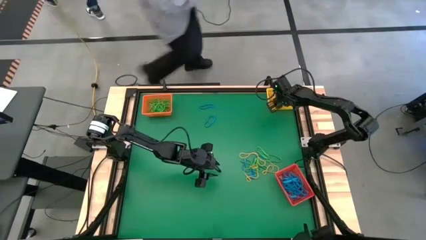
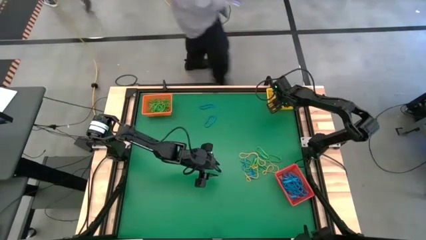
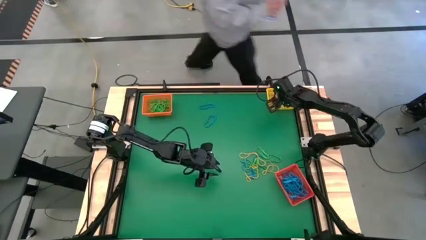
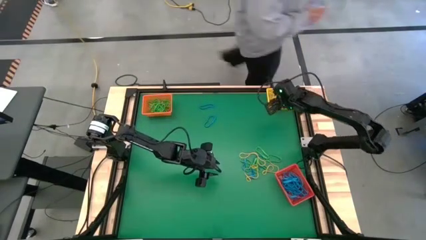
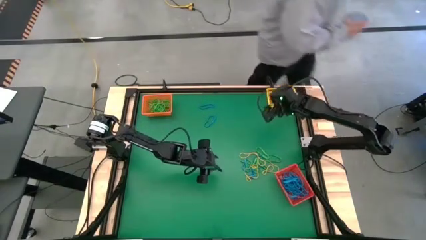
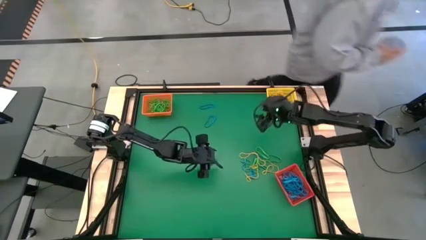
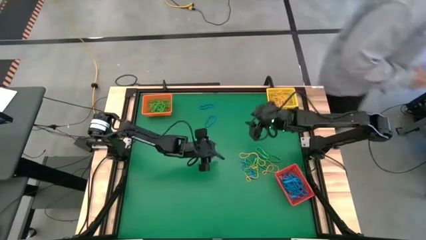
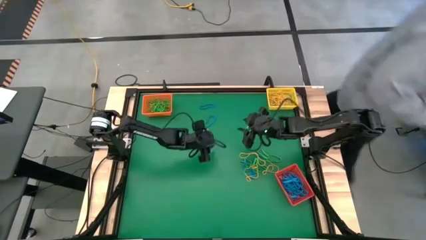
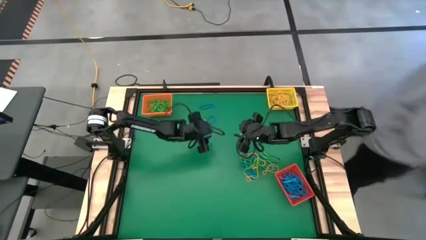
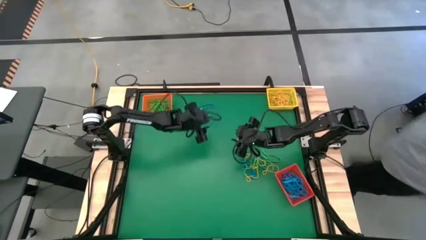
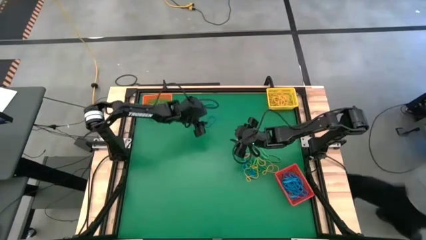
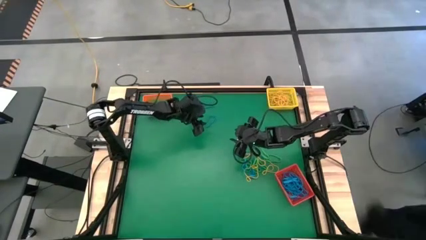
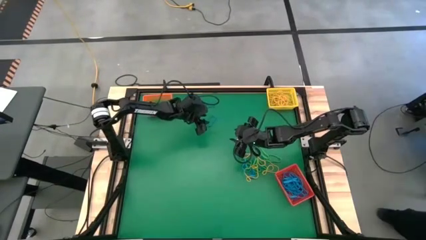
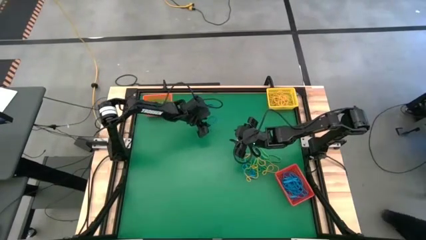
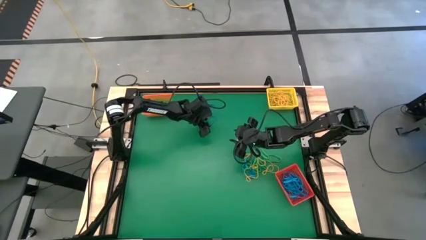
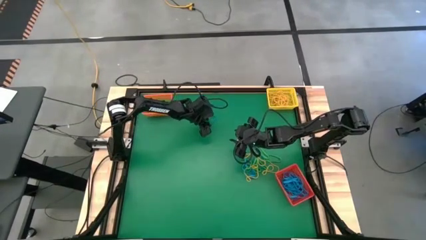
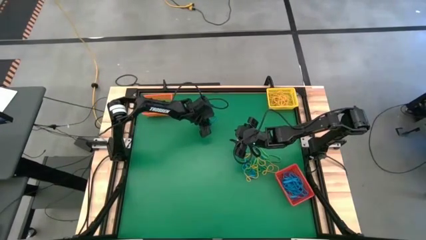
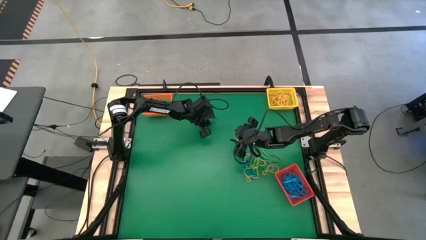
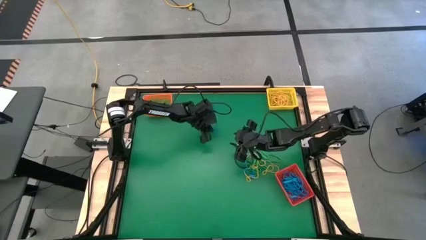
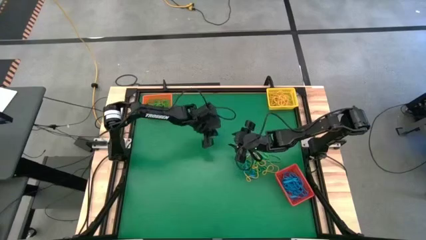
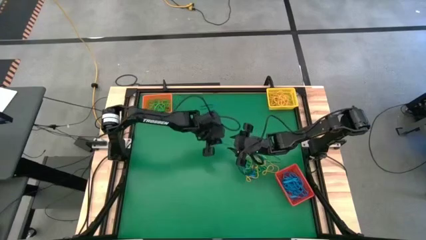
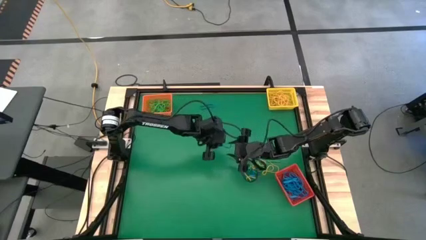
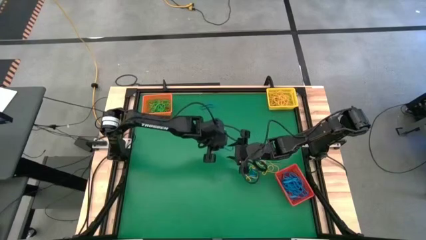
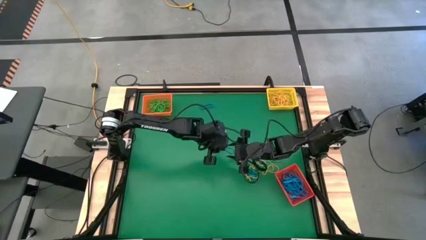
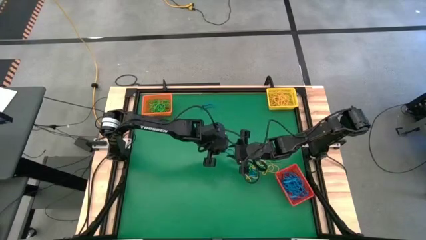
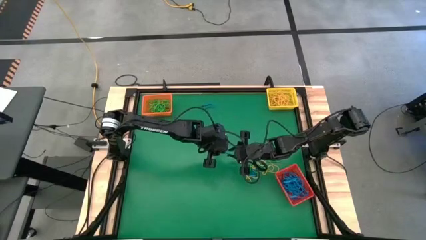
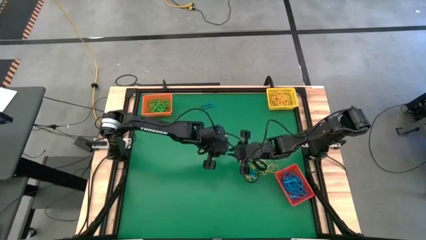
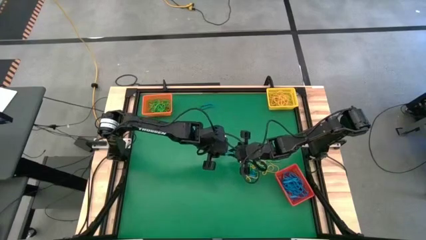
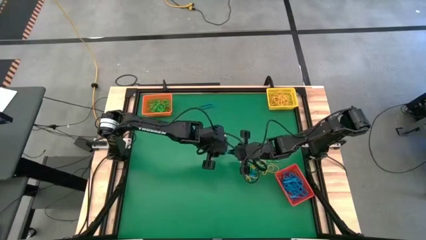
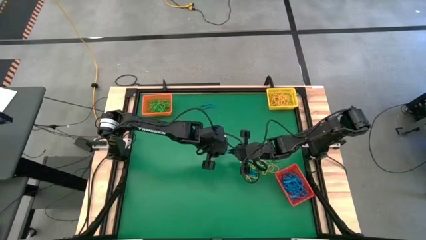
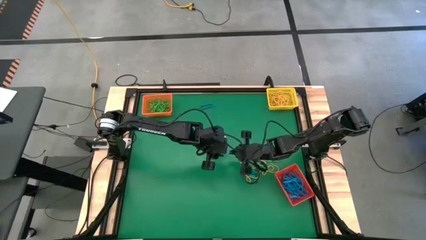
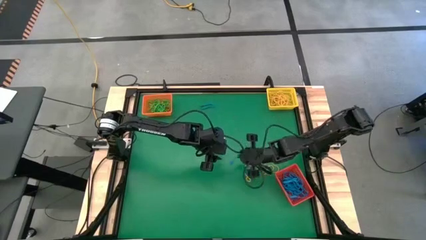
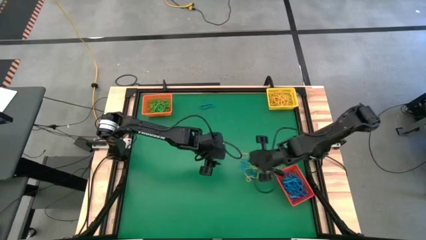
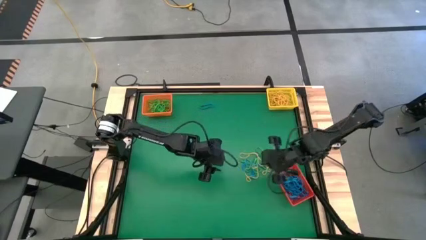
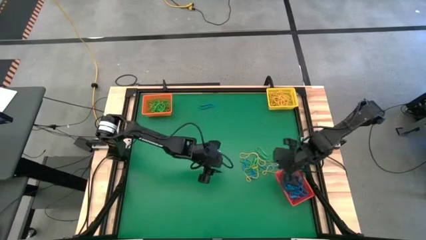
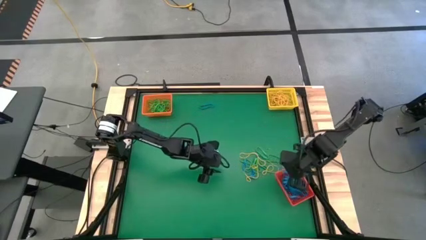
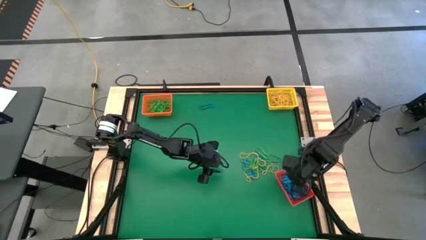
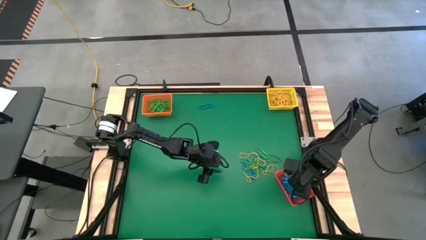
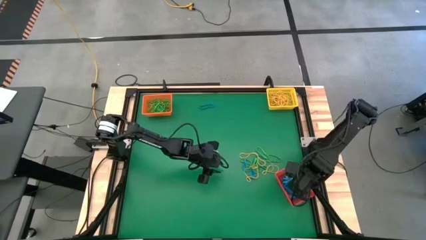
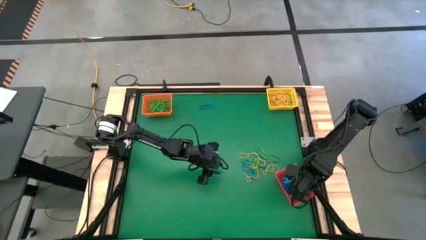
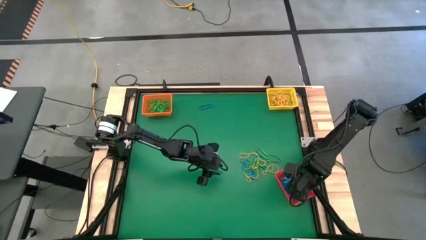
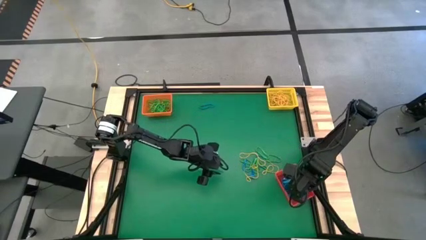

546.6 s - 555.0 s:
Task: Sort rubber bands into baskets
Put the blue rubber band into the red bin

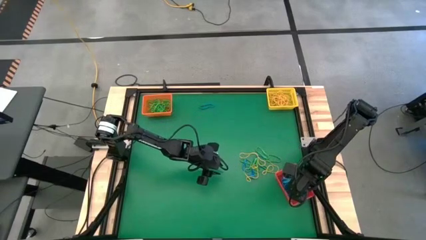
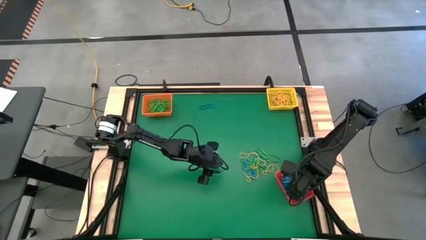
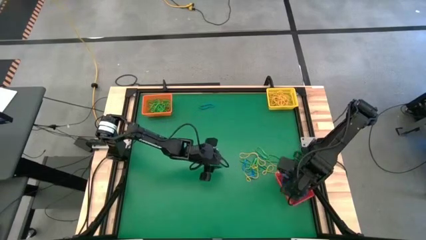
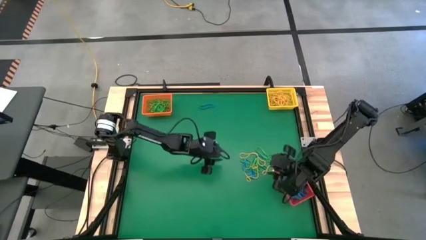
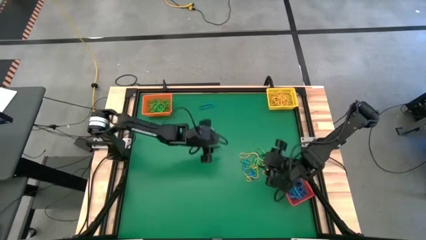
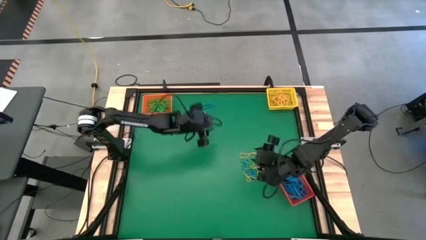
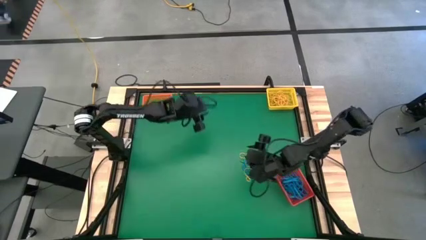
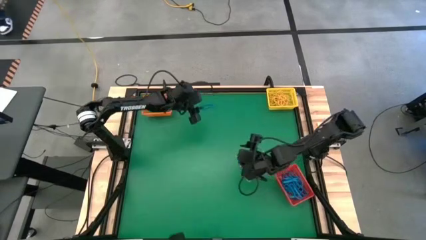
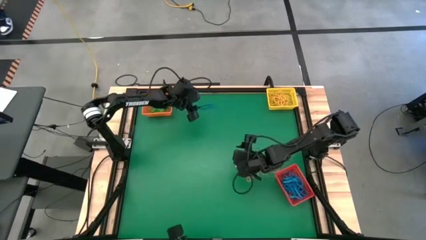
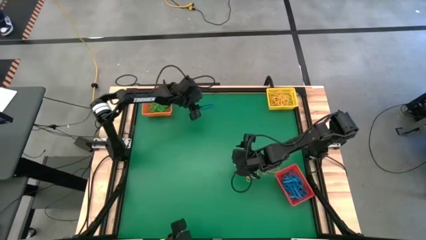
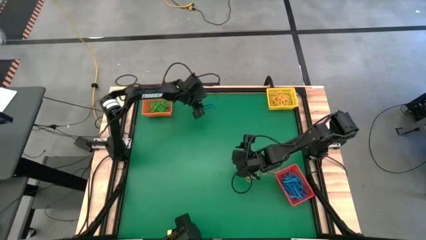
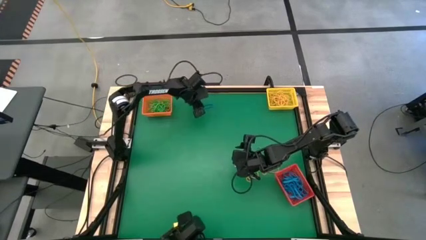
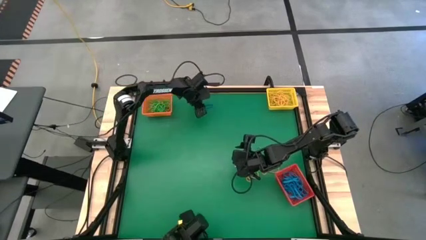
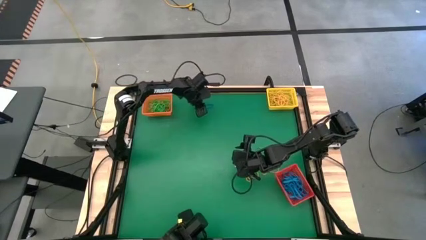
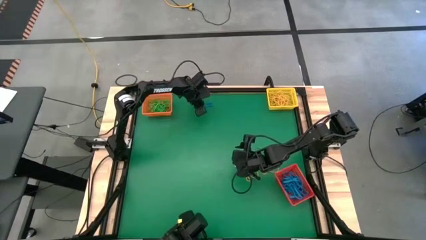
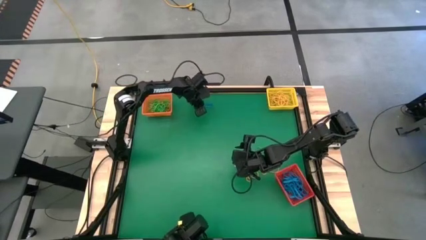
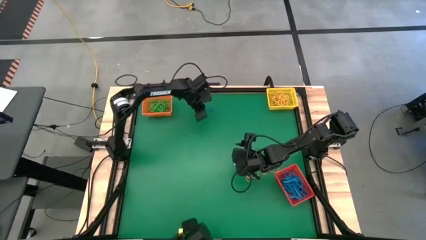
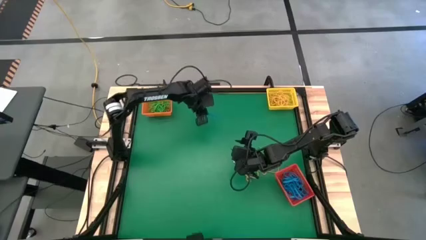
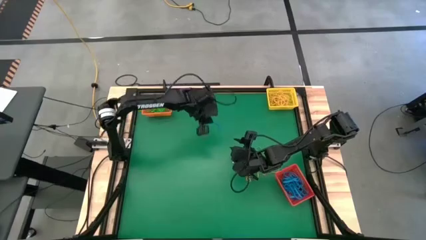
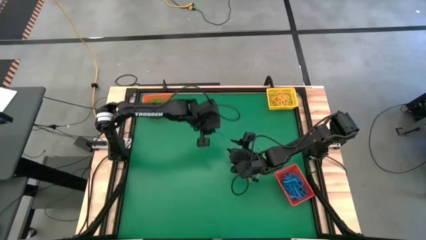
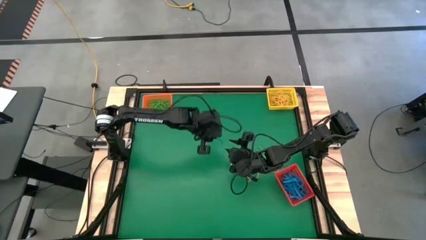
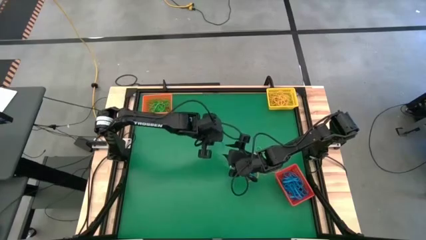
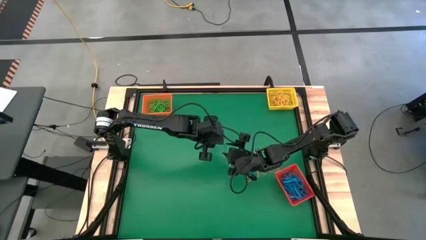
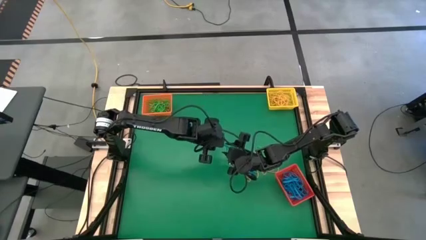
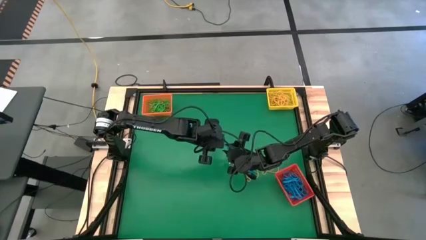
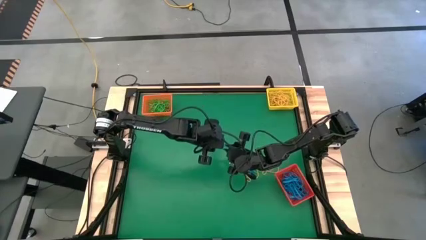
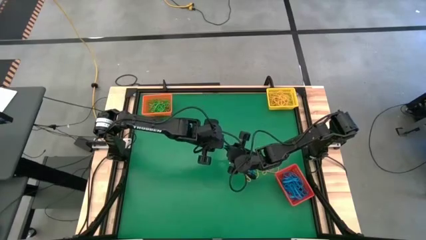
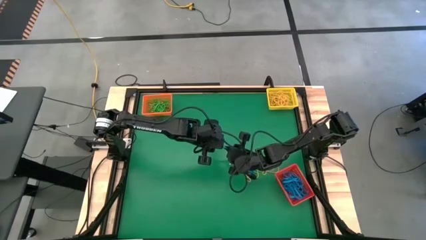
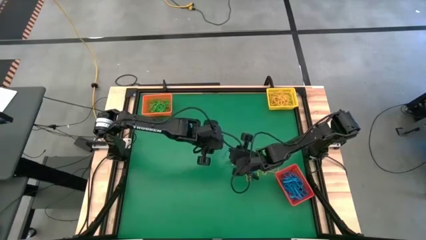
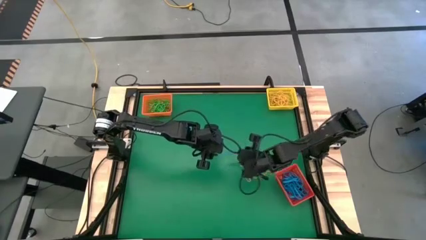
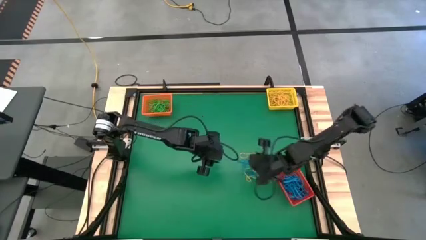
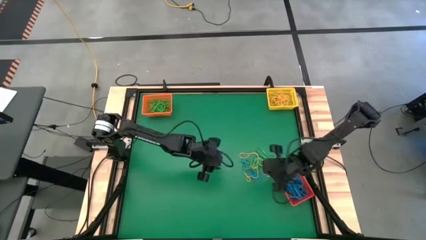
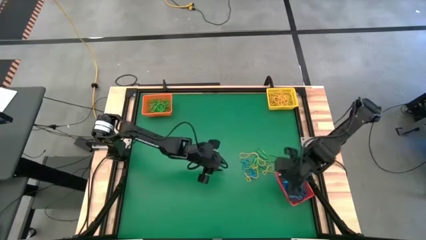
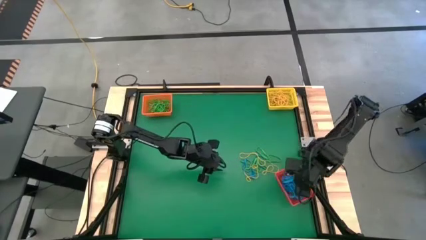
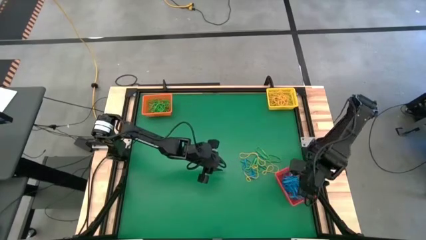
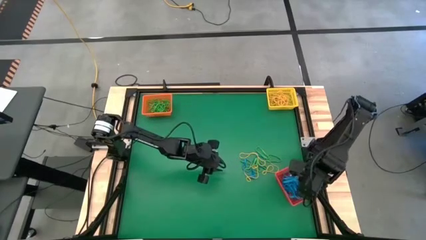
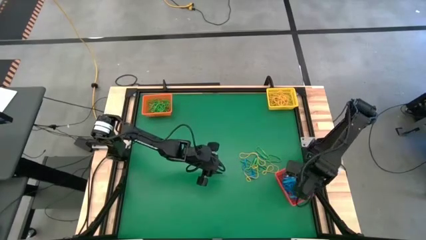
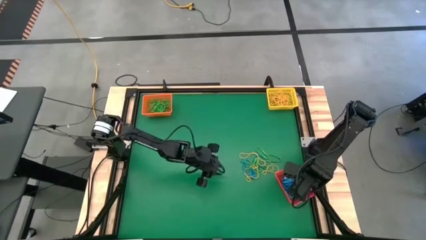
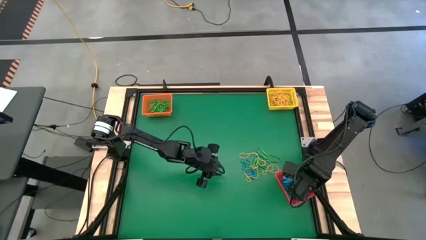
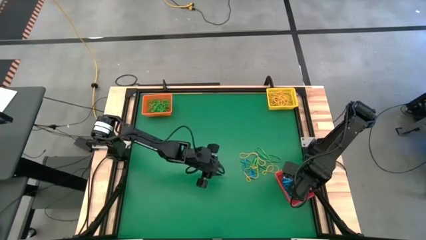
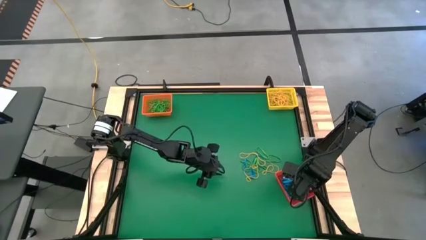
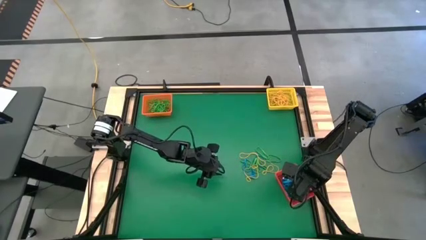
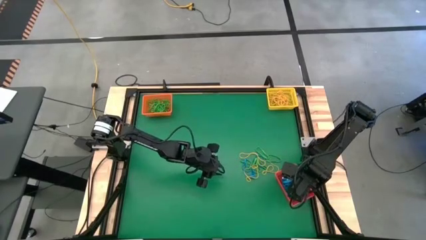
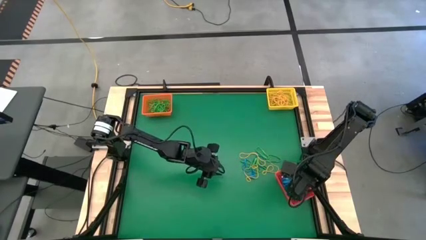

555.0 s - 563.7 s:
Put the blue rubber band into the red bin
